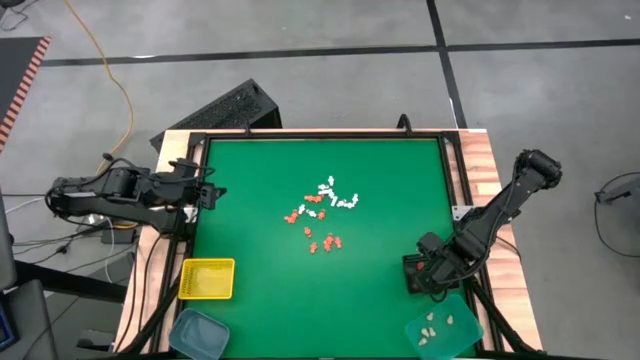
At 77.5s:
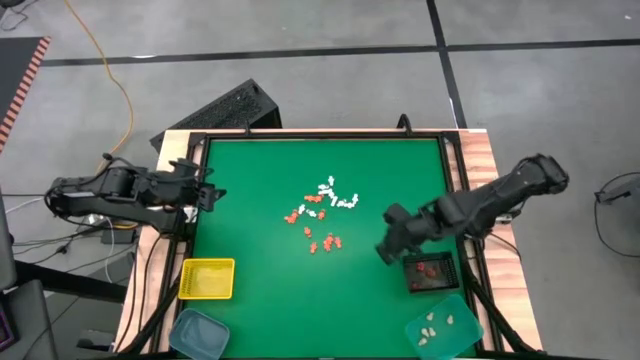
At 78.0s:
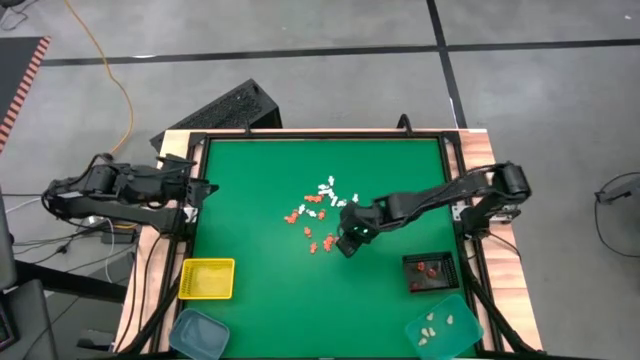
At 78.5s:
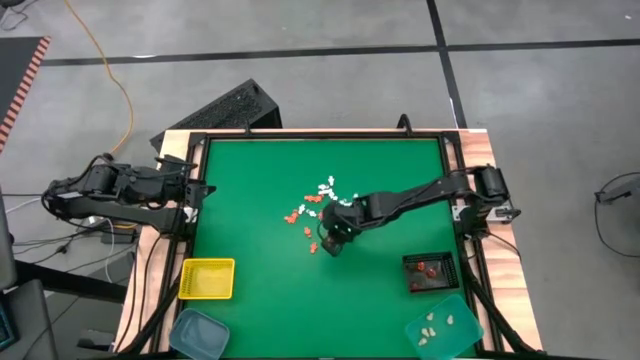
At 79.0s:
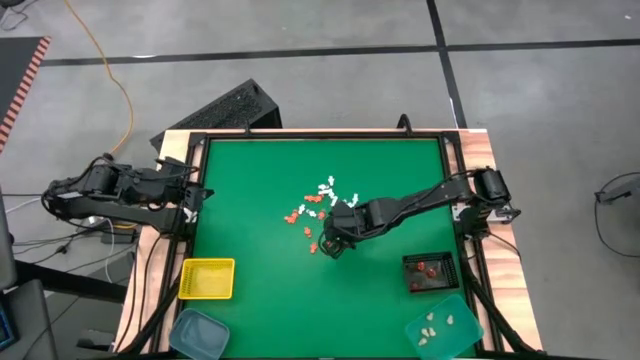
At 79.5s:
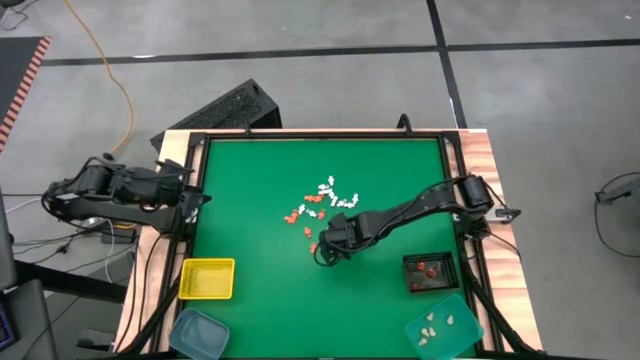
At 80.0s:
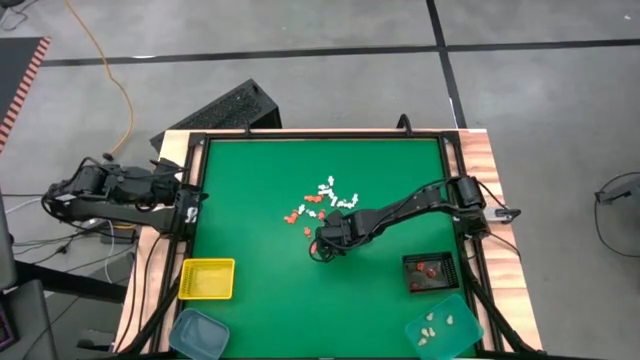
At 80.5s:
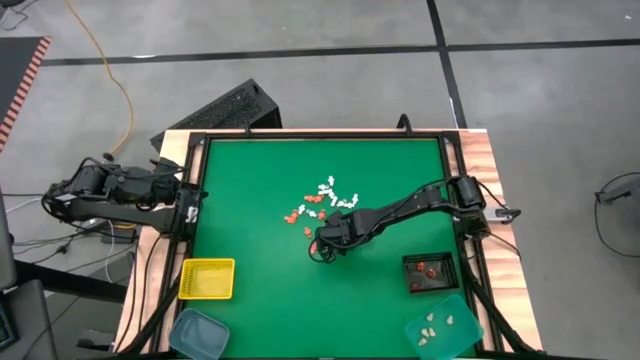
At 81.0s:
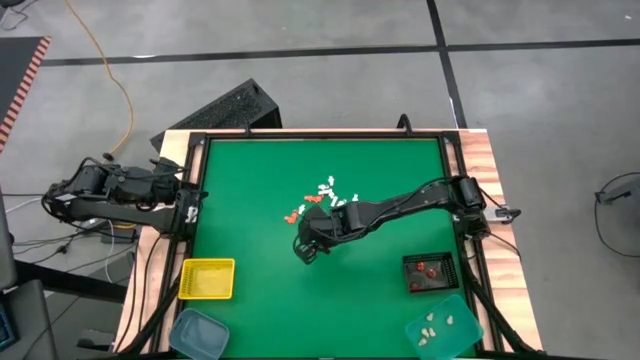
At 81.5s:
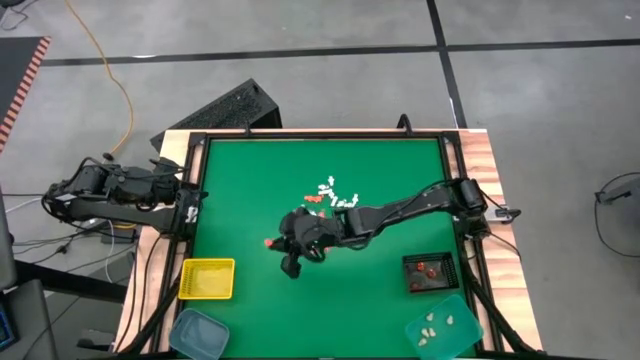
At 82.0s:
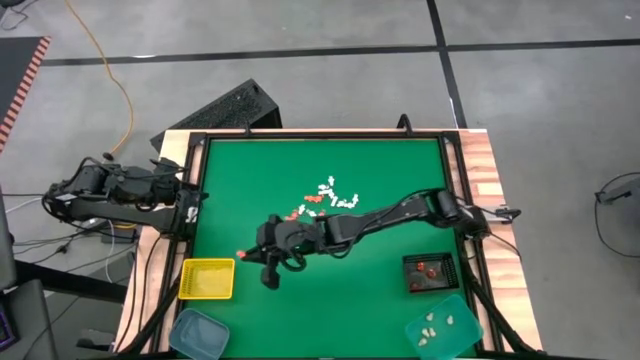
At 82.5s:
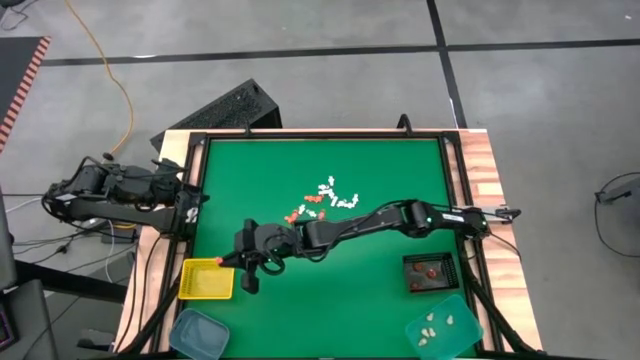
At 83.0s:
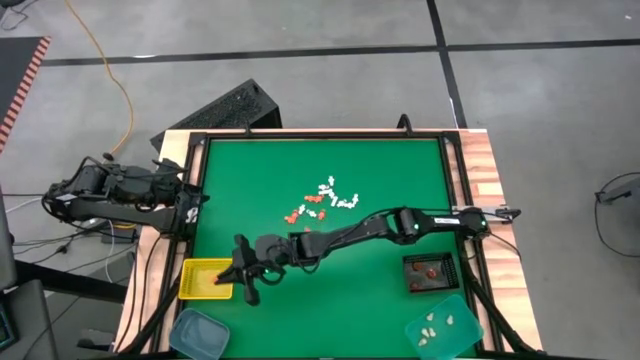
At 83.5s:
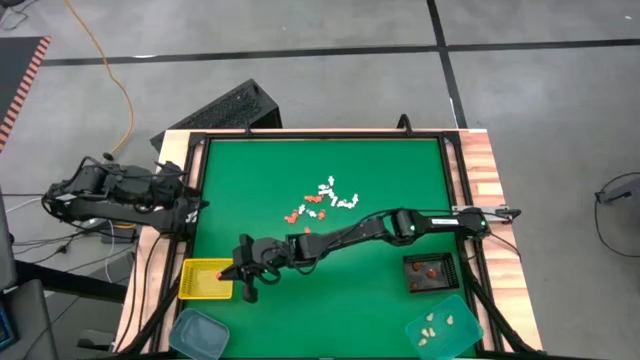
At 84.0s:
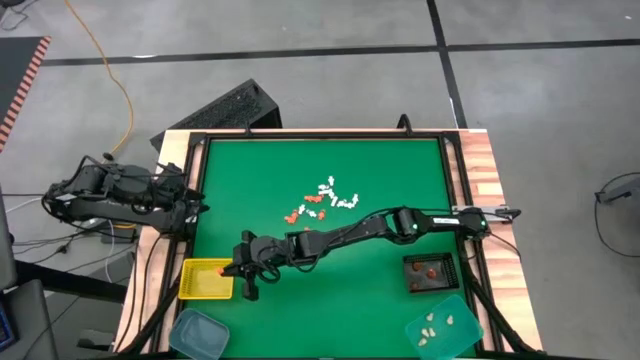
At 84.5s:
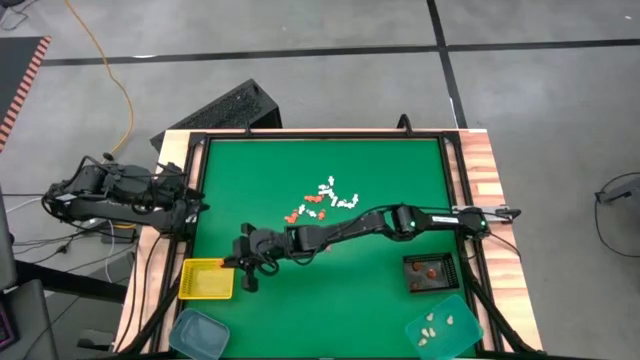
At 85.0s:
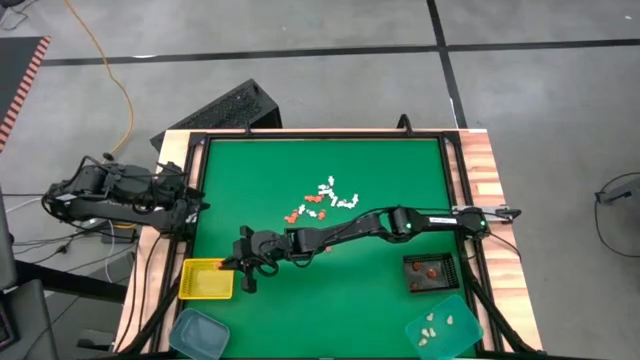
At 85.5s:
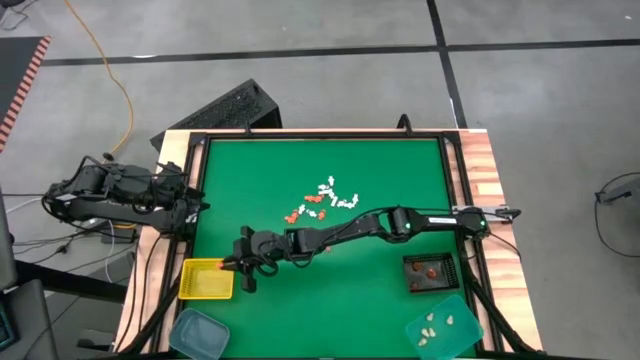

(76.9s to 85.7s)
Task: Sort Halloween decoration
Put the orange skeleton model into the yellow bin

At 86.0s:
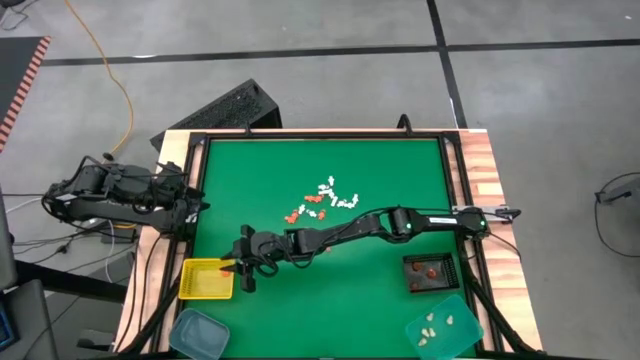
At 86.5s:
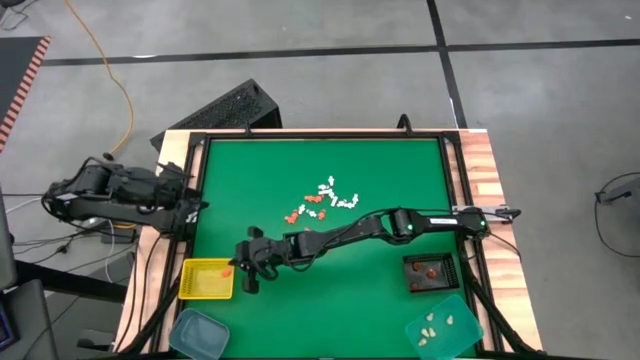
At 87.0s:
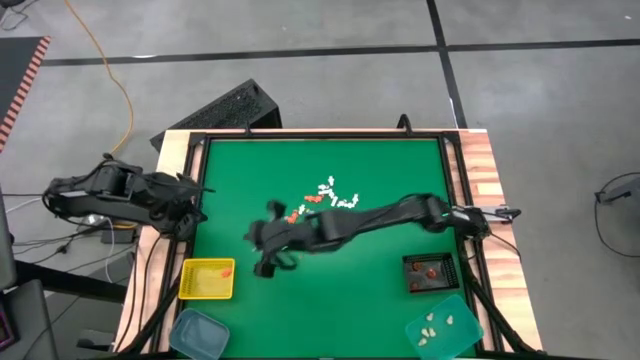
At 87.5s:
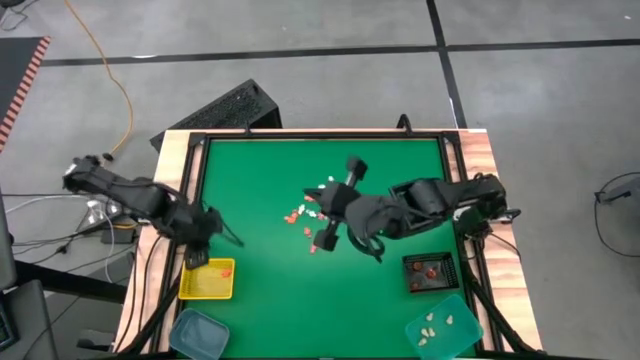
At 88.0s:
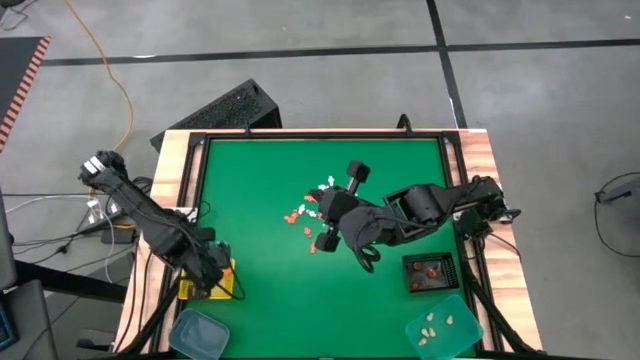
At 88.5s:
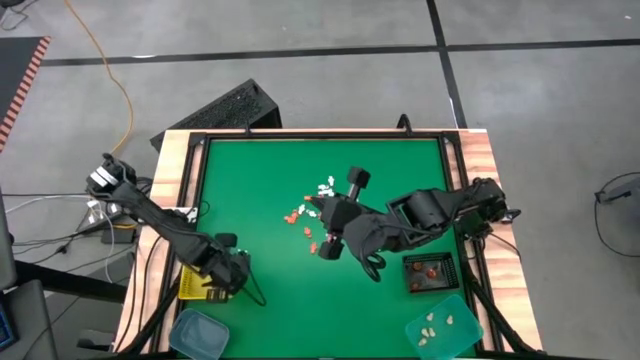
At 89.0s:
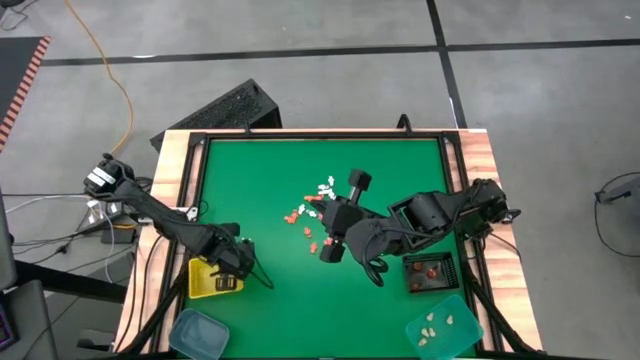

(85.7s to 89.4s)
Adjust the yellow bin

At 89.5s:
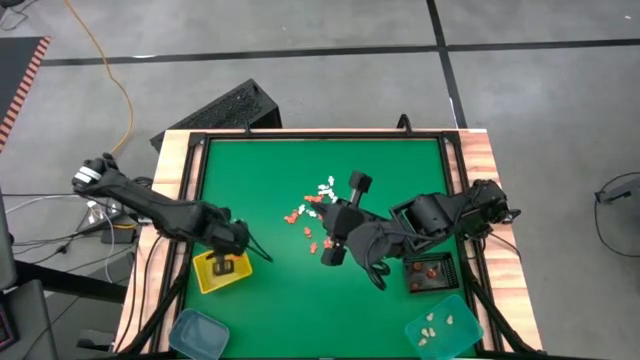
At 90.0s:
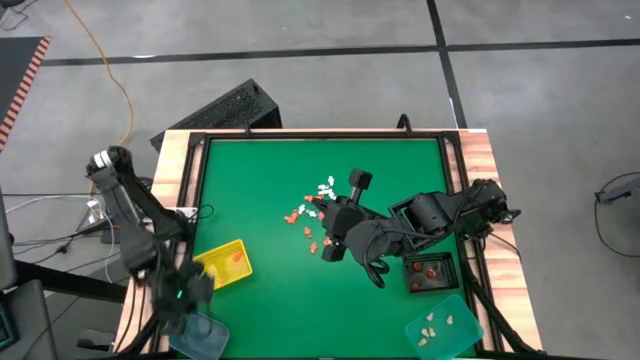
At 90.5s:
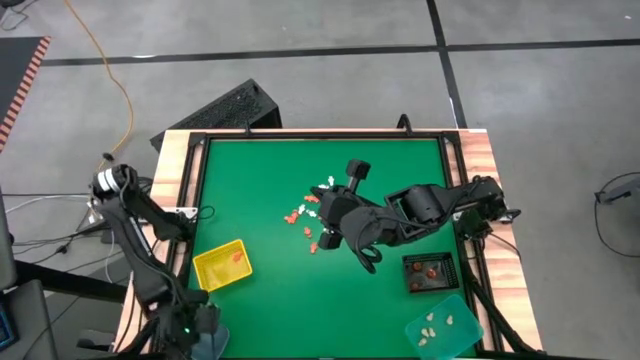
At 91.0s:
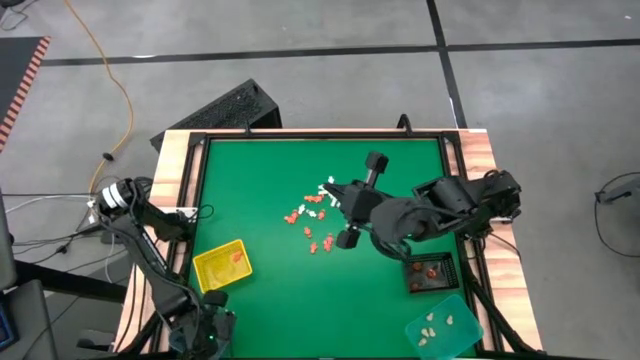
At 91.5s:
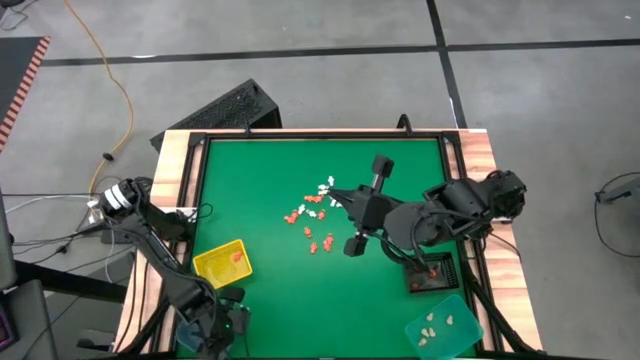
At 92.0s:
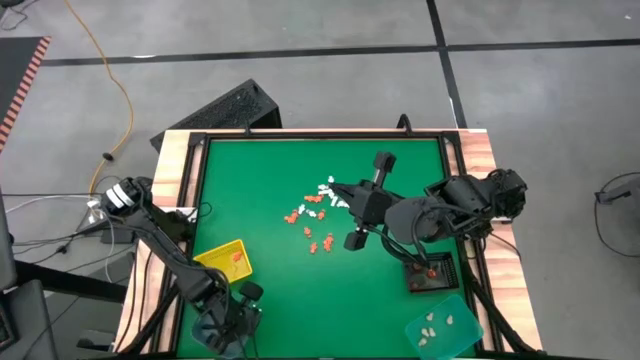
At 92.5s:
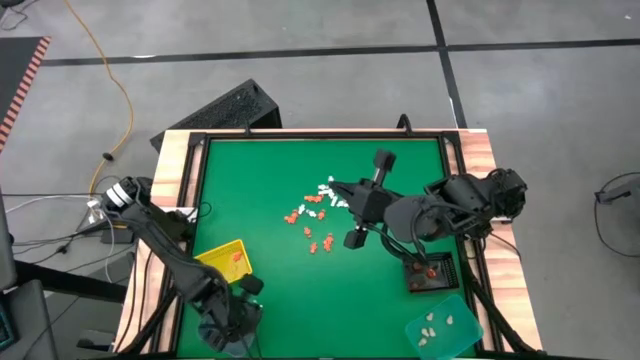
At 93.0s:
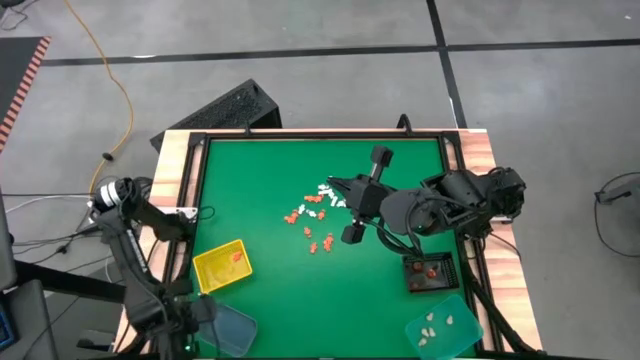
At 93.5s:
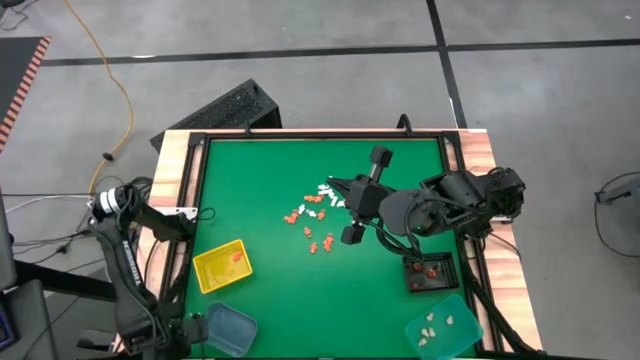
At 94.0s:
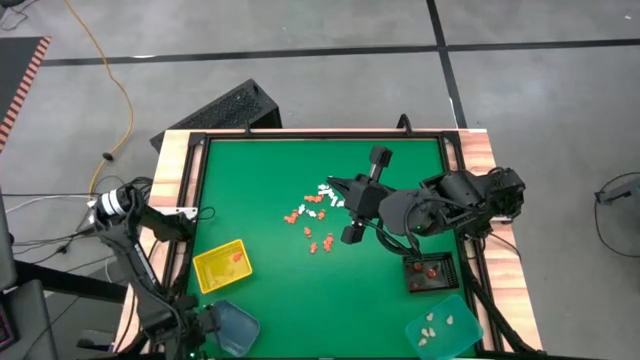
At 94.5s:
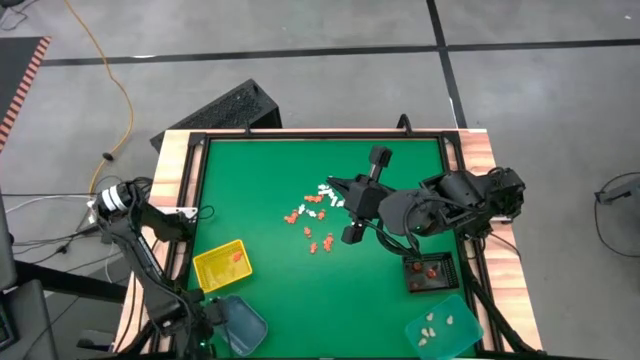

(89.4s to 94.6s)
Adjust the blue bin

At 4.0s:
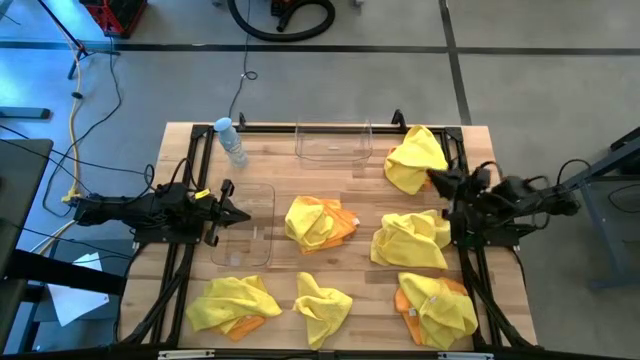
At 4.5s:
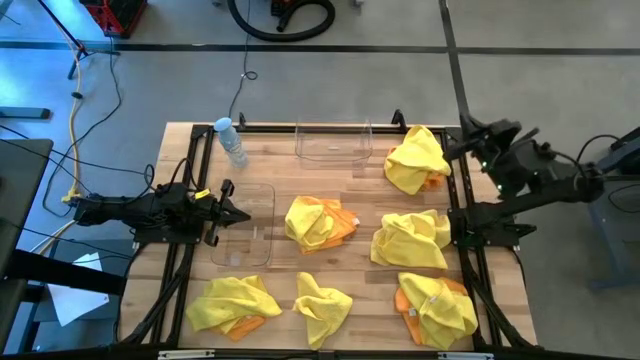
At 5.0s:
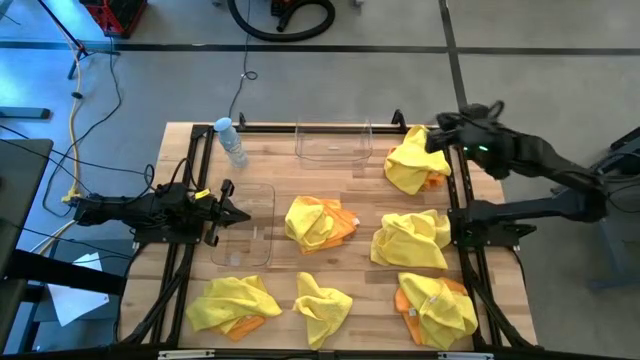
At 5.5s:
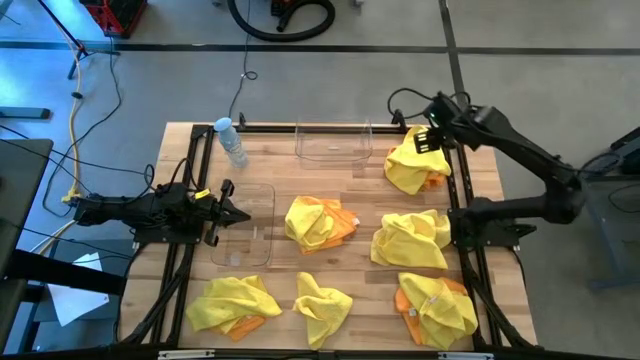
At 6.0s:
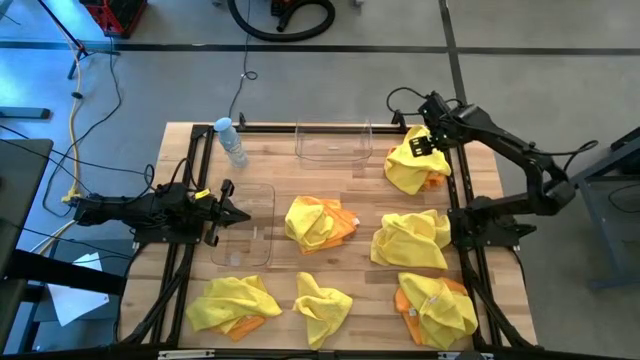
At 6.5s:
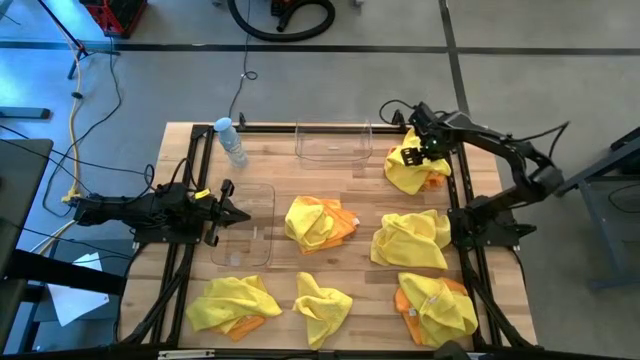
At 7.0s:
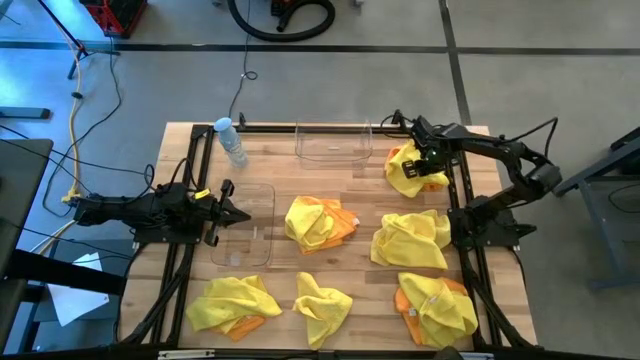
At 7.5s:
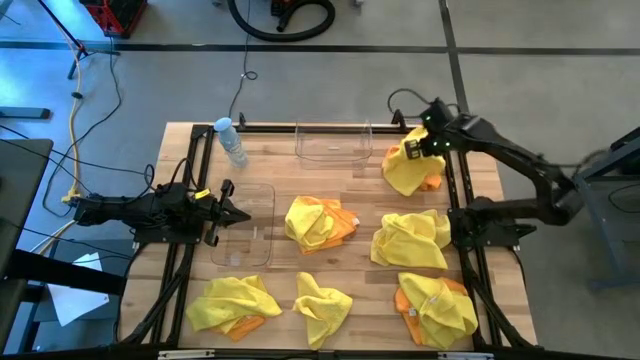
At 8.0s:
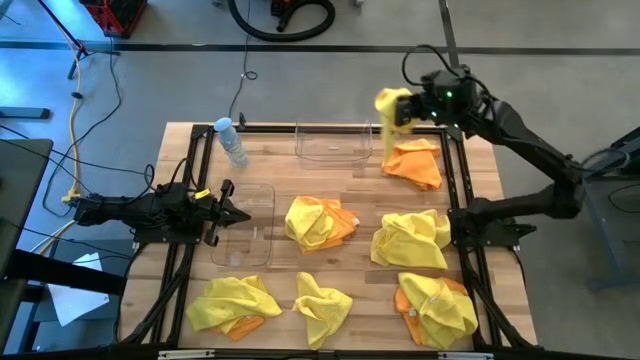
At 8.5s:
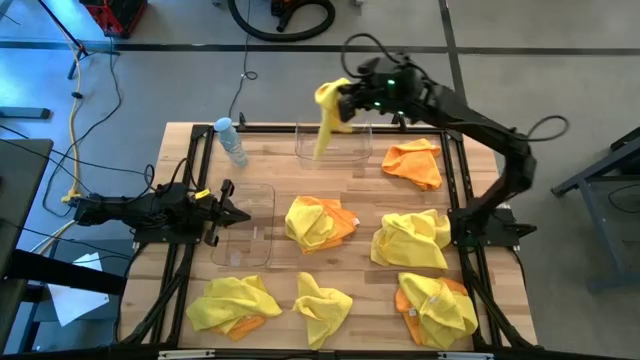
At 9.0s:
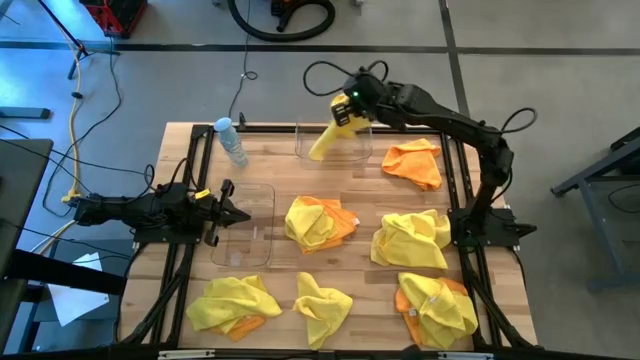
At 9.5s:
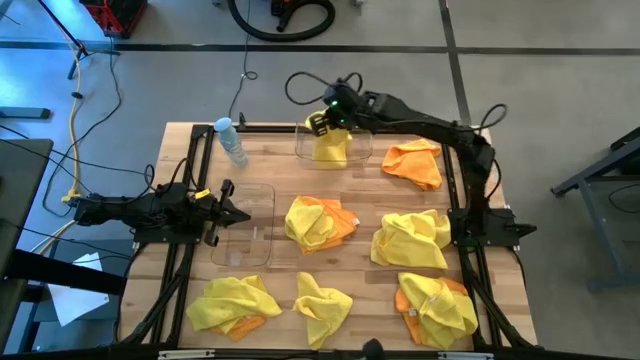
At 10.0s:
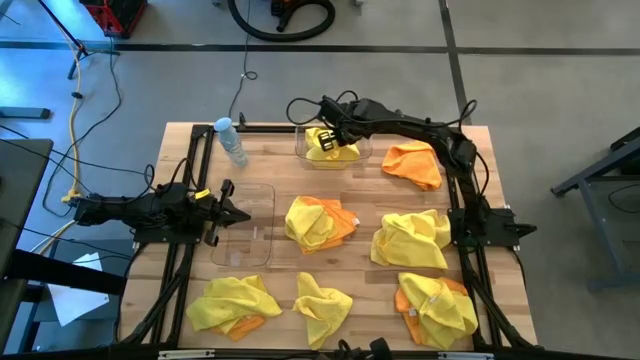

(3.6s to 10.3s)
Task: Sort microfiber towel by color & place in baskets
Put the yellow microfiber towel into the top transparent bin
